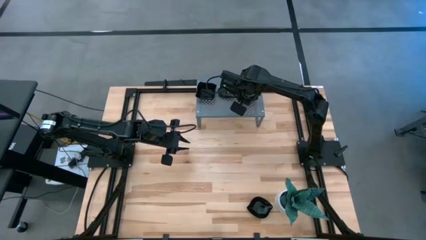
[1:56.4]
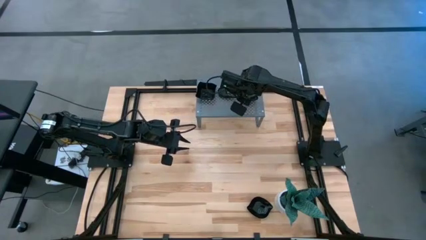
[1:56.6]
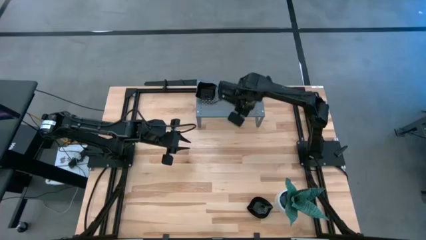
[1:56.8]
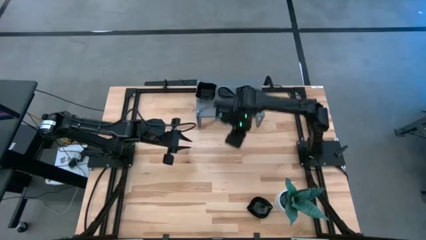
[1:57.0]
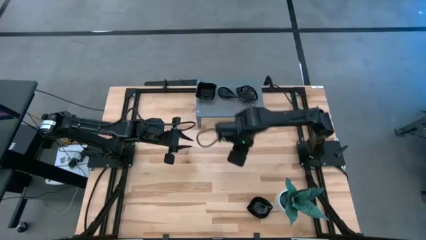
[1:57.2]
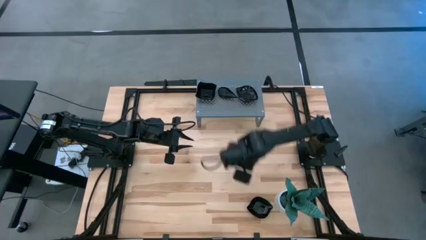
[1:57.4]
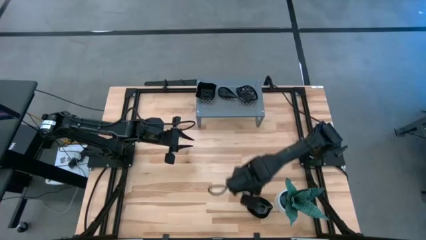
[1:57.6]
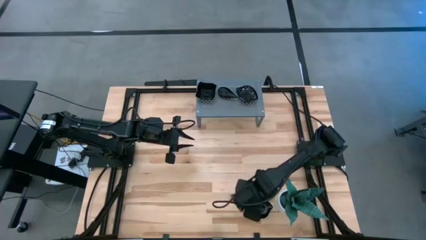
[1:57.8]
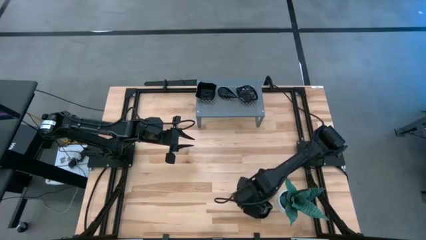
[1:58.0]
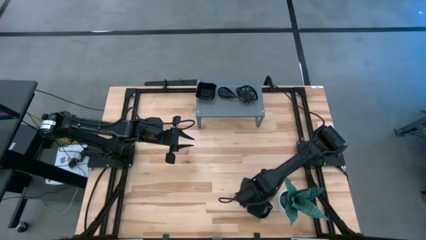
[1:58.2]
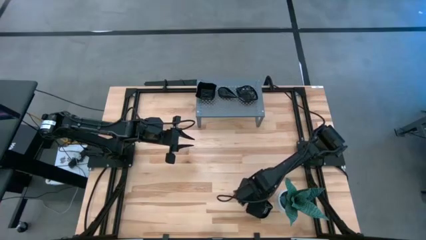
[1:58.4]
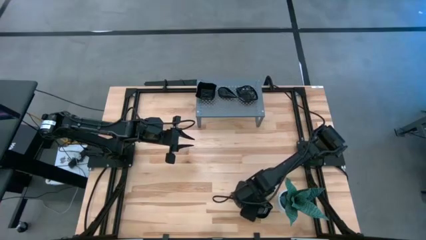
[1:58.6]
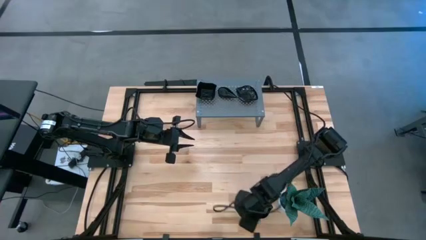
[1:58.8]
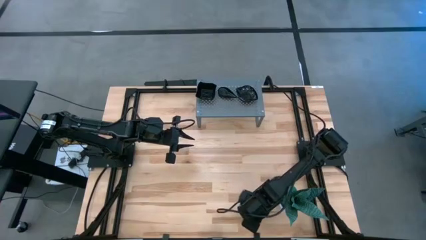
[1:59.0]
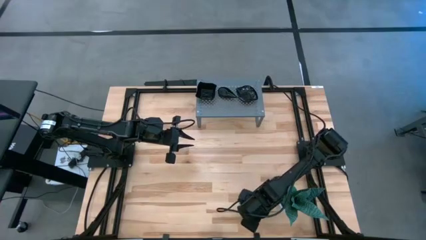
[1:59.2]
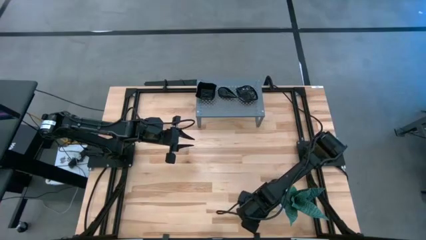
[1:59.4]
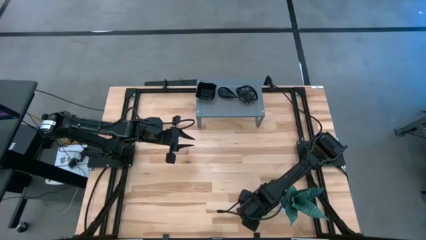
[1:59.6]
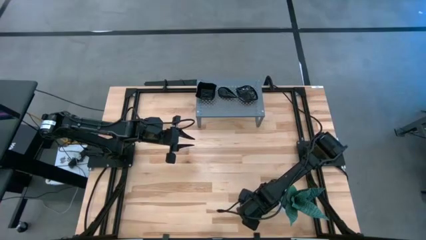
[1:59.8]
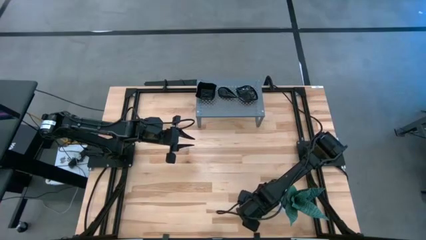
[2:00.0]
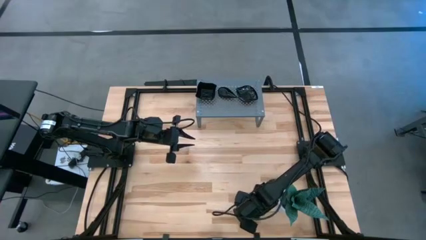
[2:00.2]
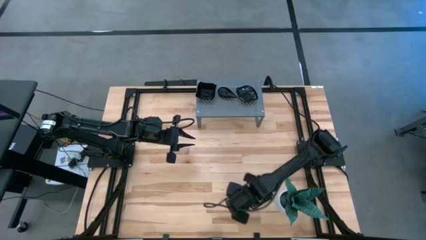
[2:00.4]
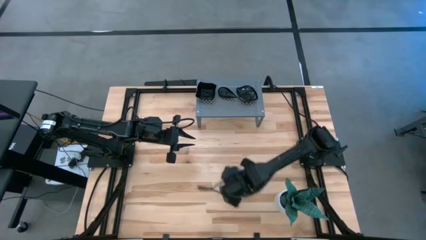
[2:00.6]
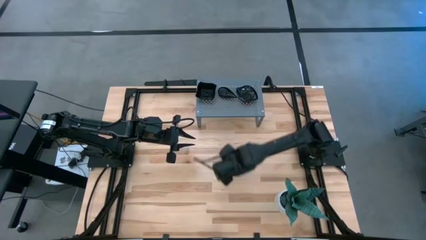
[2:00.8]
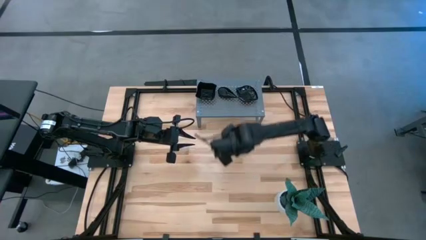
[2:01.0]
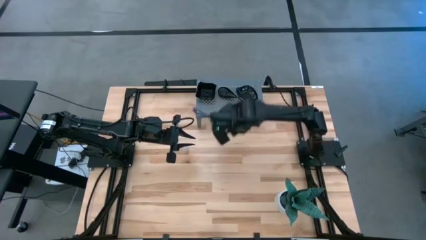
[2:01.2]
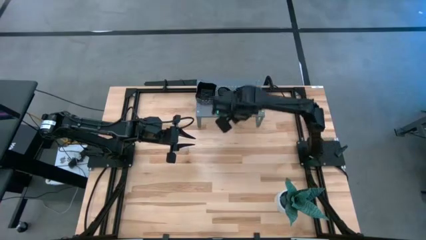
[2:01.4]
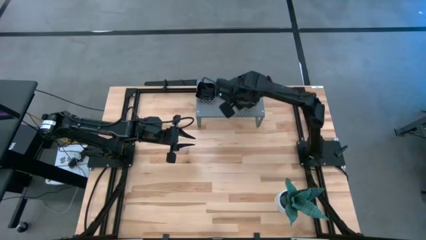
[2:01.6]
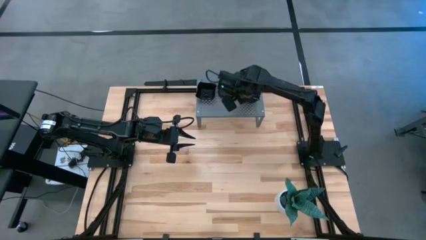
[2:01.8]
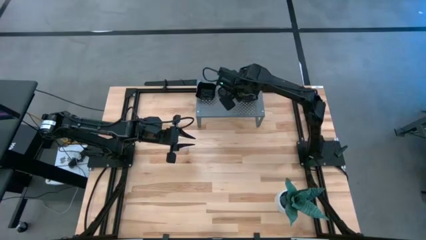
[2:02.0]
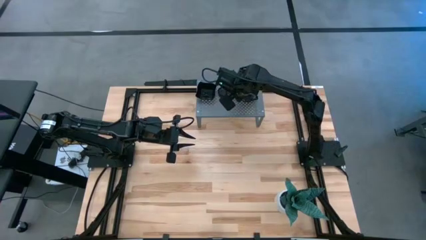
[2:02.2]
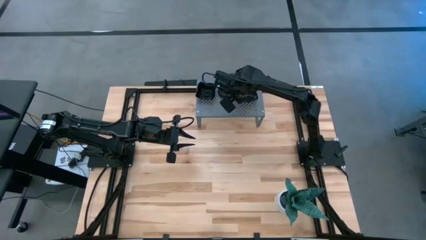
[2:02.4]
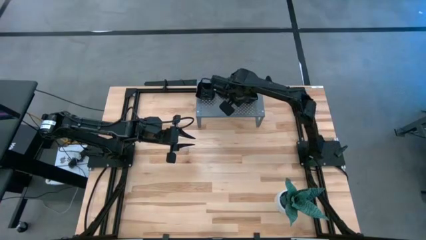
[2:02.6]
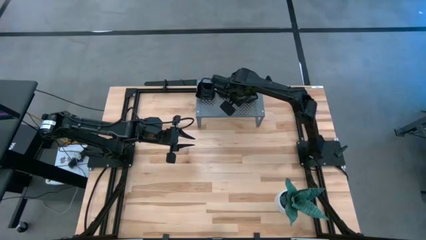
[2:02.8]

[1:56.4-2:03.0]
Task: Pick & Place Mini shaped plates
Stack the leaf-shaped plate on top of the leaf-shaped plate on the shelf

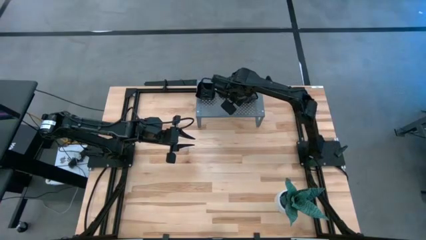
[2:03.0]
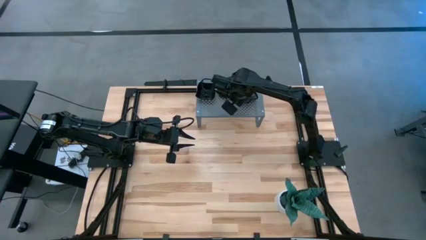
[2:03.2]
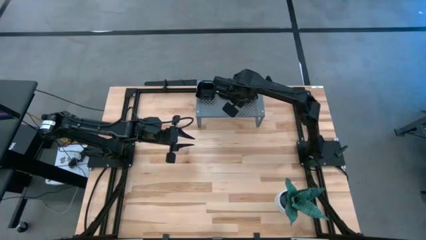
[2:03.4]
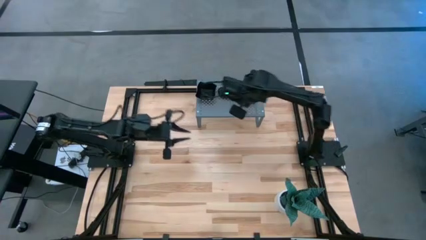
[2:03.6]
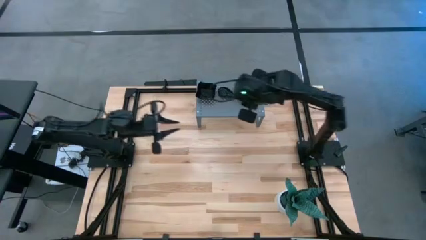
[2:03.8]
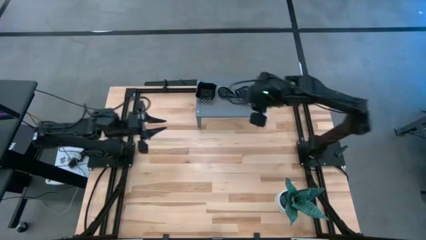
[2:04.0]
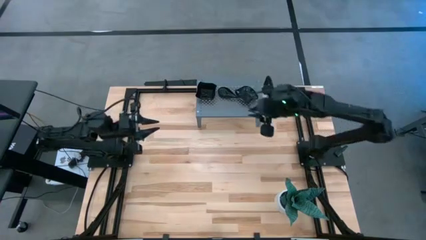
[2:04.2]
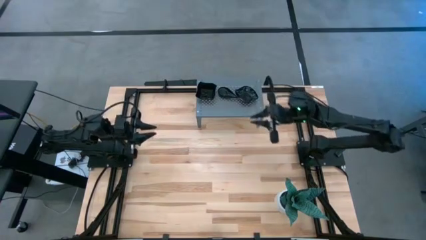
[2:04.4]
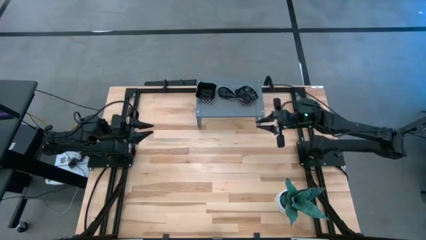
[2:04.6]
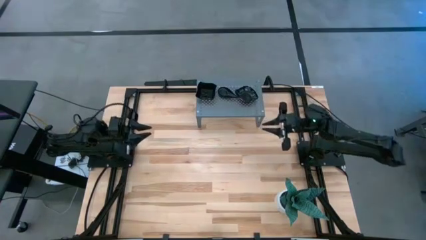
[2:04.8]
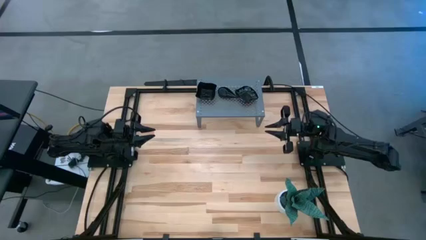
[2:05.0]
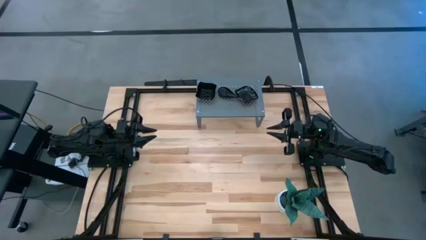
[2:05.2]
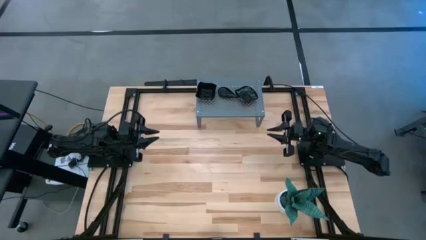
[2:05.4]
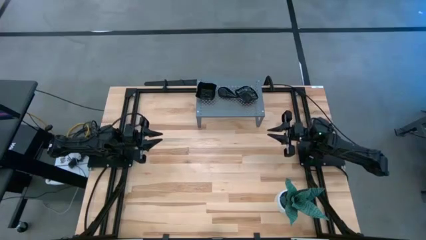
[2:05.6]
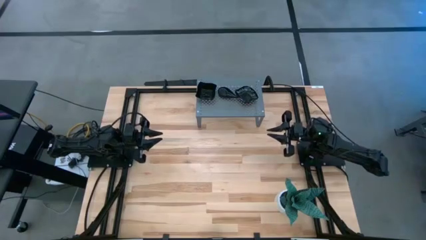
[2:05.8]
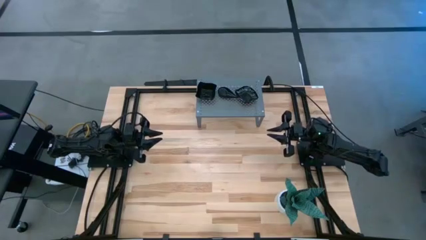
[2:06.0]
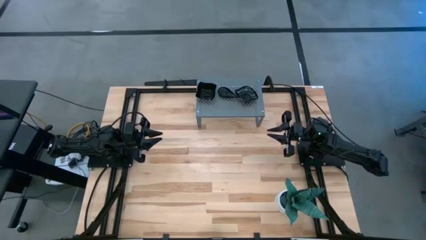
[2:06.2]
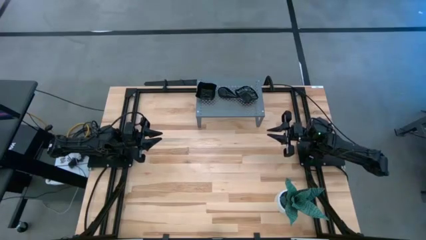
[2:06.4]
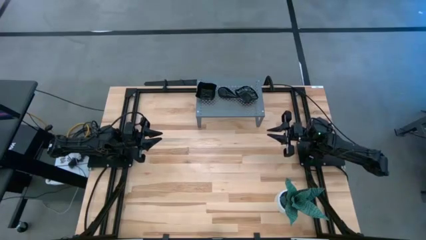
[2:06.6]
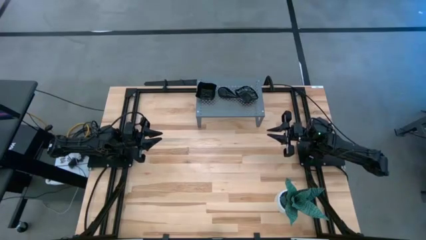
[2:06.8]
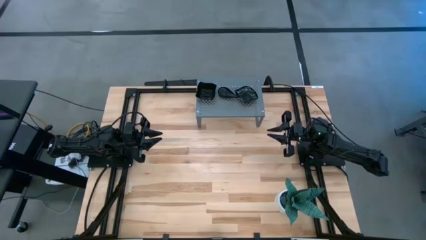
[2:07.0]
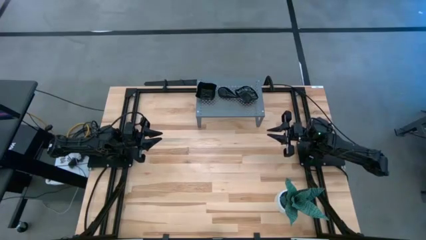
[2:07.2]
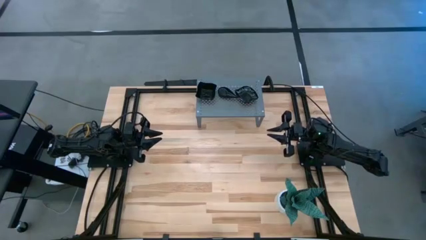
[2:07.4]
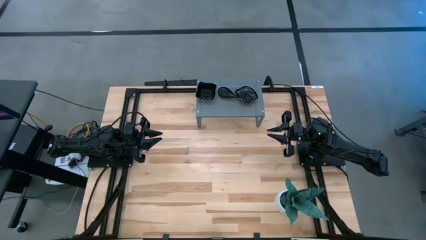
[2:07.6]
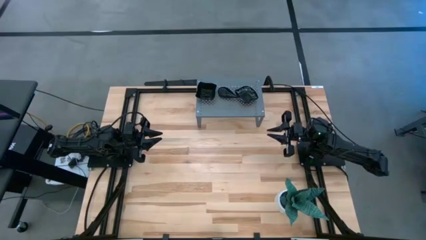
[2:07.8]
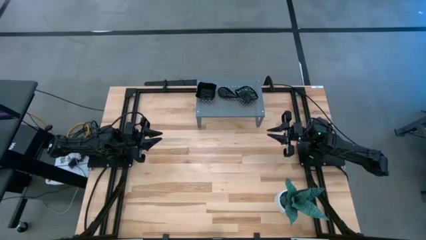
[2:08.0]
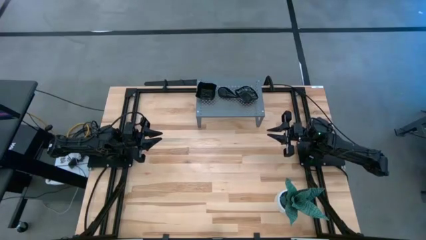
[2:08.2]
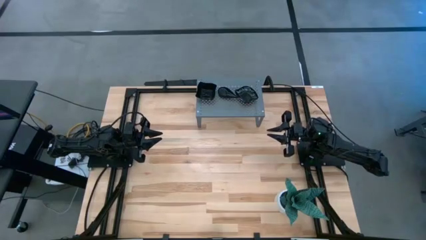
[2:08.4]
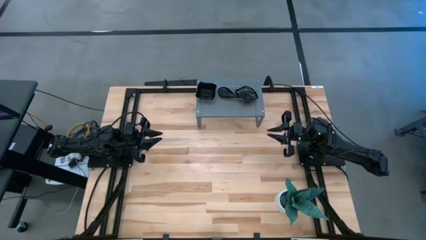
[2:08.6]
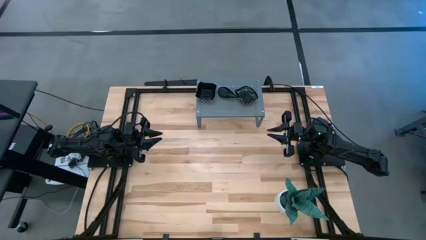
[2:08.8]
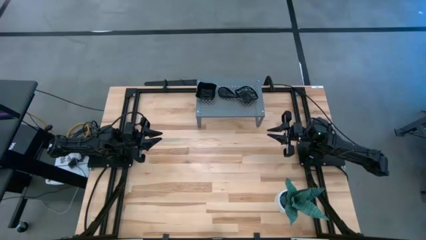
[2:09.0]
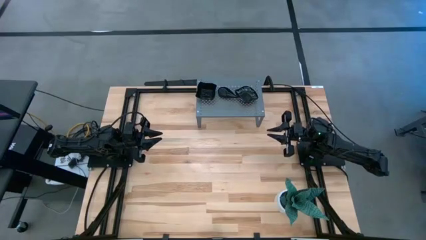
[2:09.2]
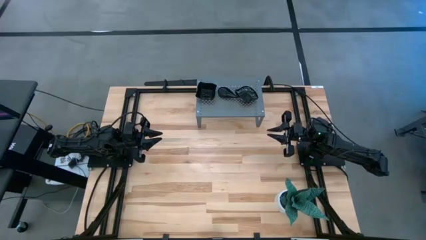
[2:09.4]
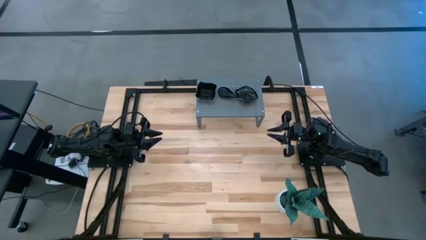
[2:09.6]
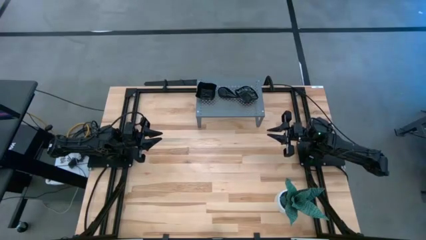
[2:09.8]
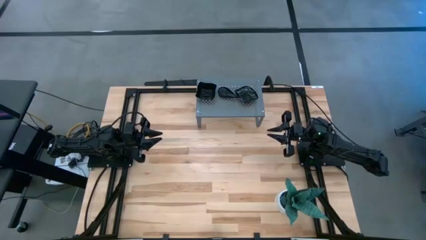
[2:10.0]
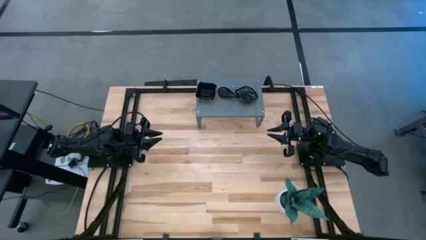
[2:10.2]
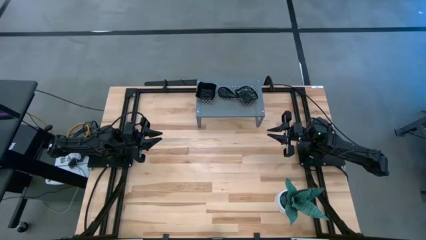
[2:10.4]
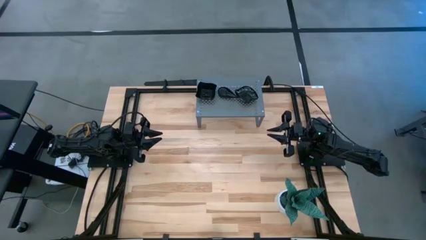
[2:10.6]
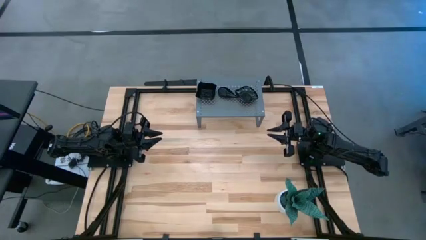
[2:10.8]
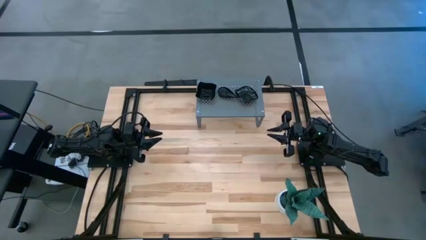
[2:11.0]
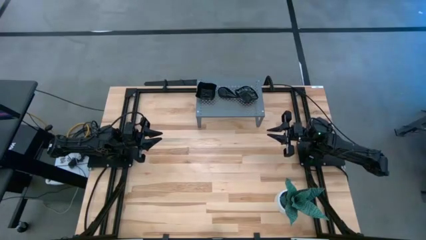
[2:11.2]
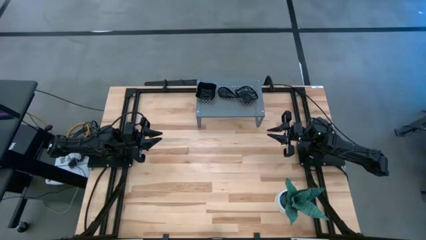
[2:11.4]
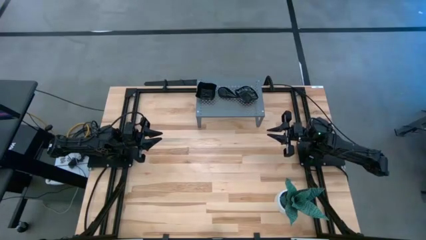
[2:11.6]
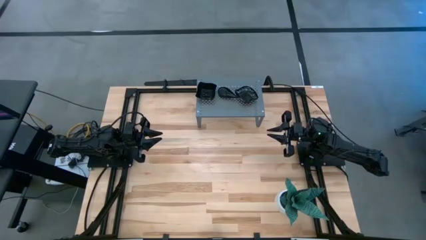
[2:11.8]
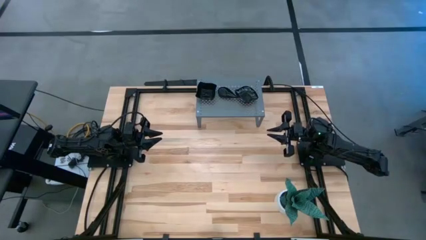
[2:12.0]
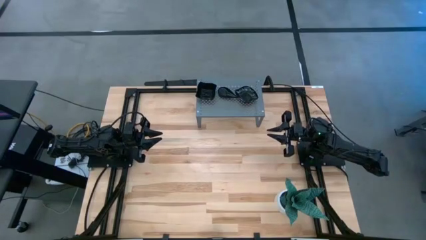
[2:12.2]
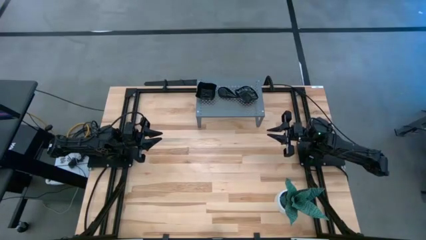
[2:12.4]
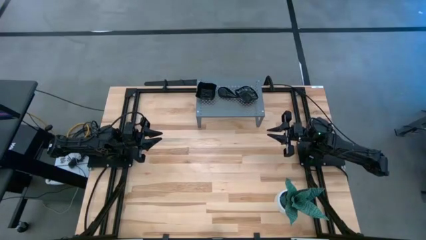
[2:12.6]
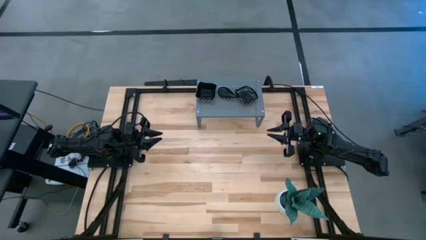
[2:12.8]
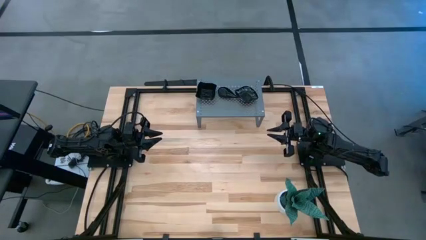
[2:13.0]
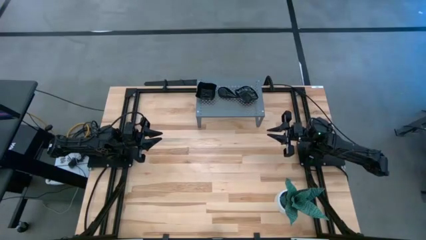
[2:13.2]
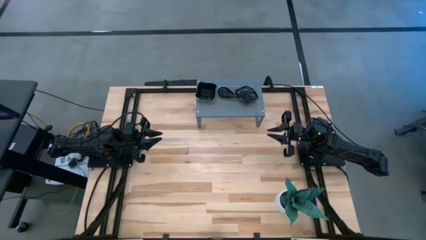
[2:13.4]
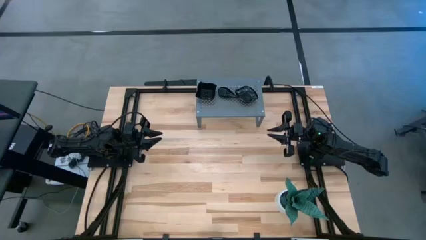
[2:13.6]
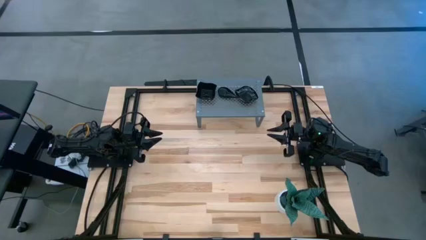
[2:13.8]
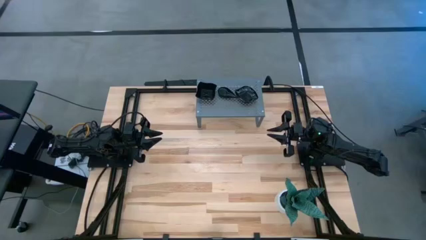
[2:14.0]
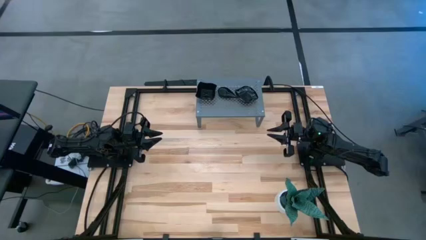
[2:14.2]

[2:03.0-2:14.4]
Return to Home Position
